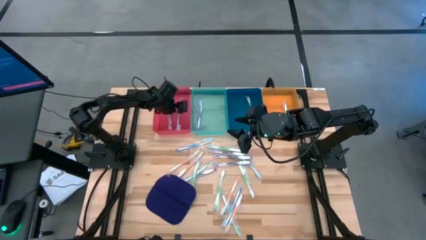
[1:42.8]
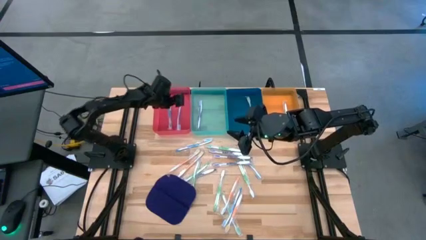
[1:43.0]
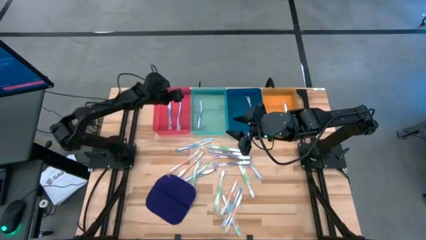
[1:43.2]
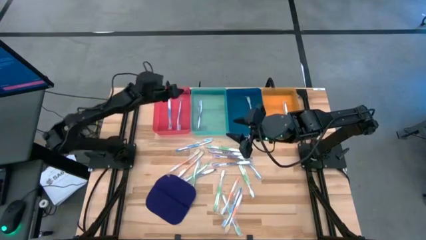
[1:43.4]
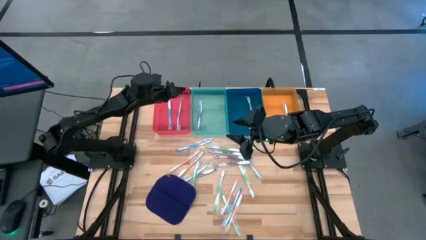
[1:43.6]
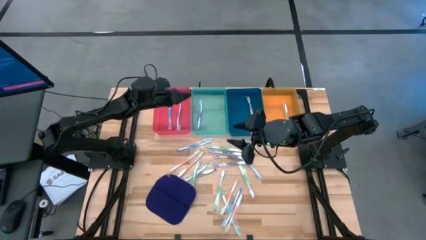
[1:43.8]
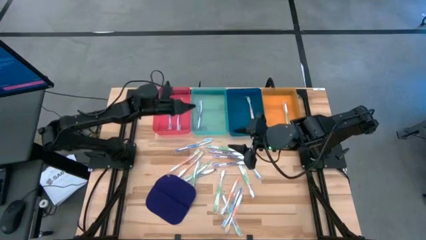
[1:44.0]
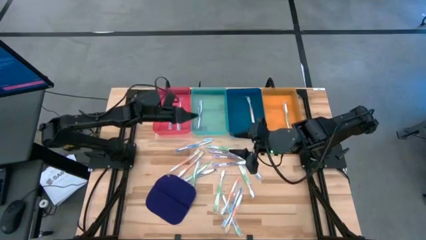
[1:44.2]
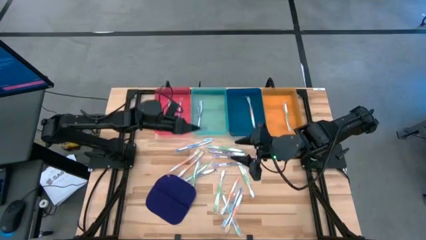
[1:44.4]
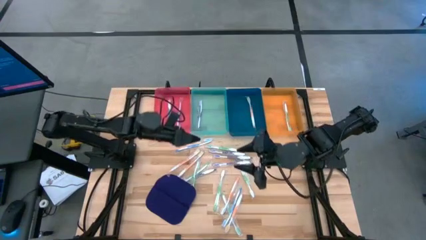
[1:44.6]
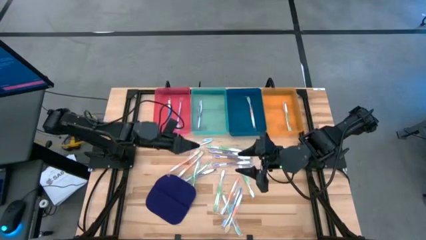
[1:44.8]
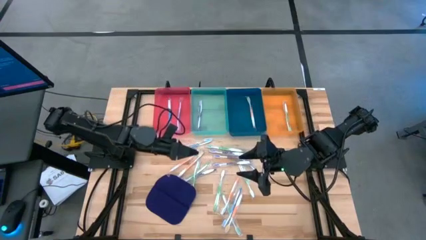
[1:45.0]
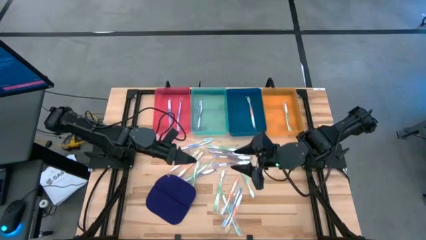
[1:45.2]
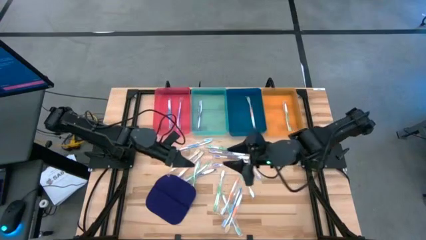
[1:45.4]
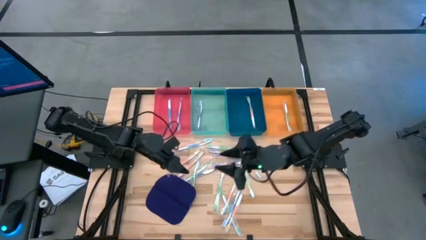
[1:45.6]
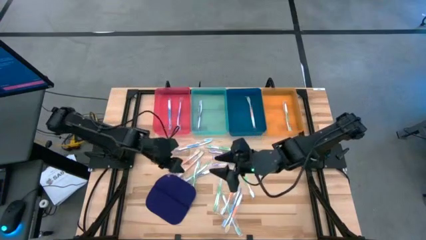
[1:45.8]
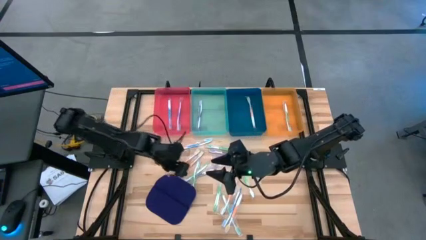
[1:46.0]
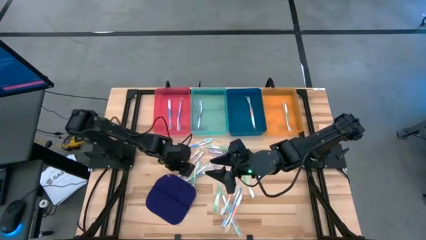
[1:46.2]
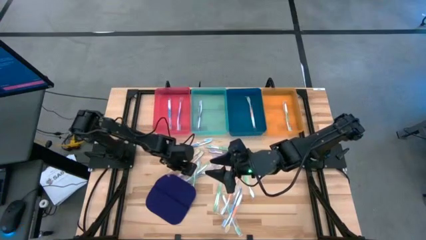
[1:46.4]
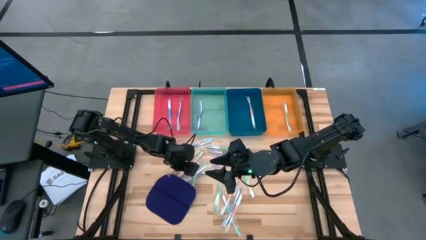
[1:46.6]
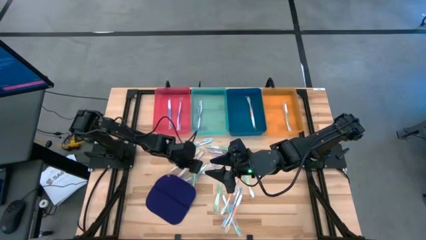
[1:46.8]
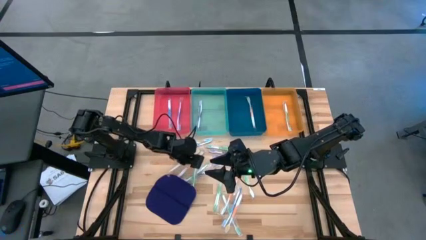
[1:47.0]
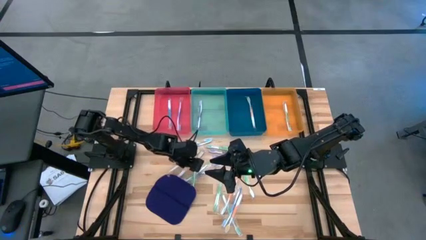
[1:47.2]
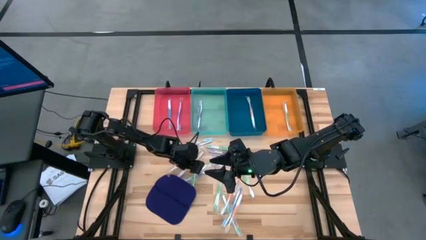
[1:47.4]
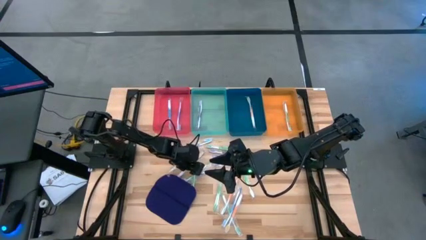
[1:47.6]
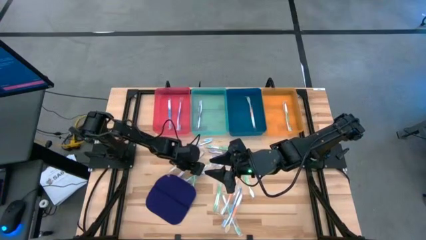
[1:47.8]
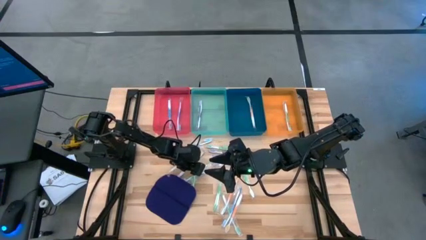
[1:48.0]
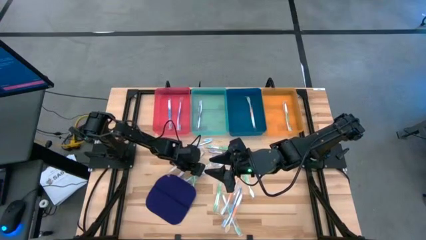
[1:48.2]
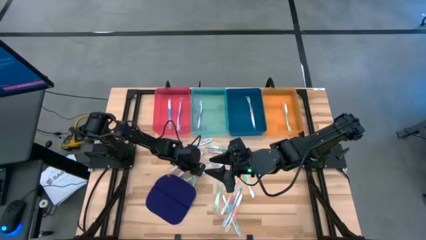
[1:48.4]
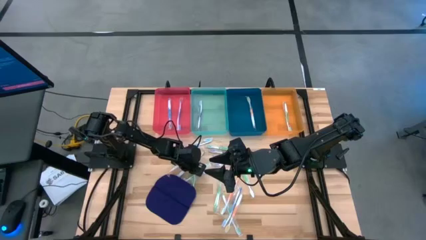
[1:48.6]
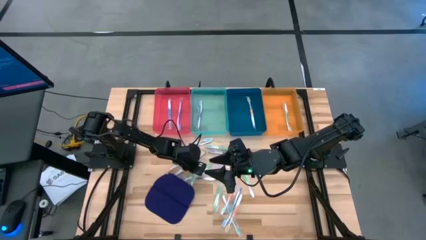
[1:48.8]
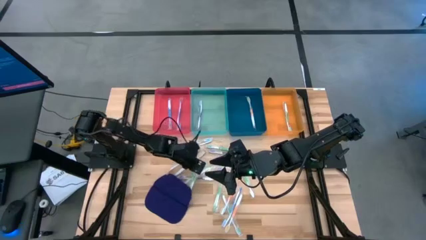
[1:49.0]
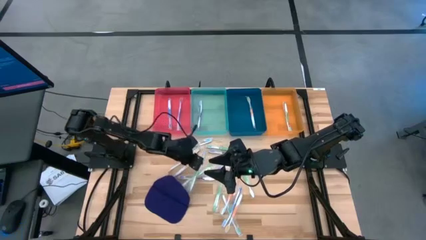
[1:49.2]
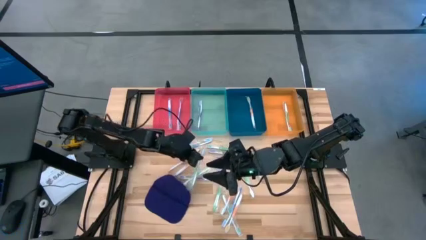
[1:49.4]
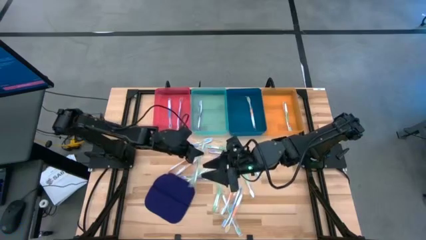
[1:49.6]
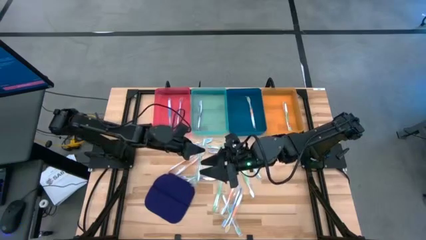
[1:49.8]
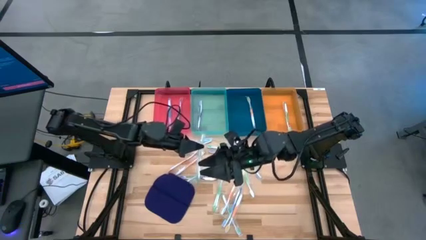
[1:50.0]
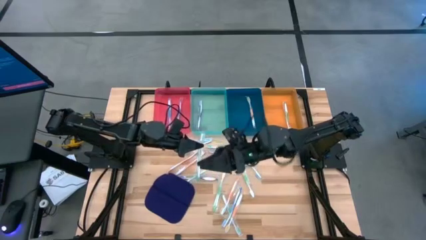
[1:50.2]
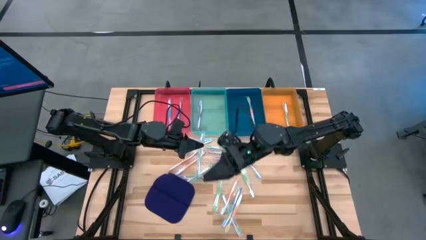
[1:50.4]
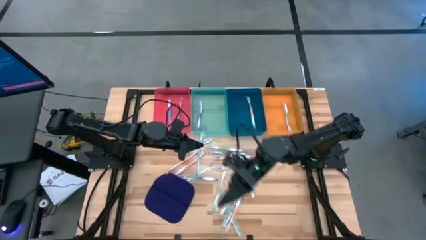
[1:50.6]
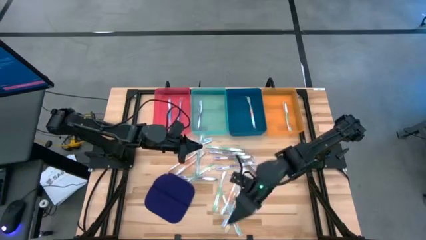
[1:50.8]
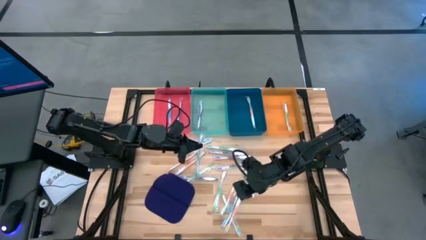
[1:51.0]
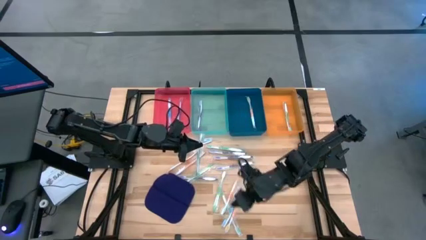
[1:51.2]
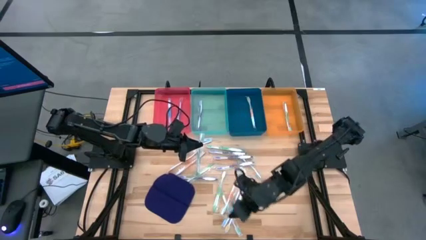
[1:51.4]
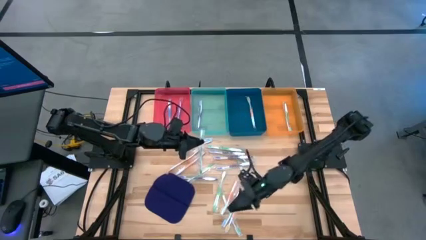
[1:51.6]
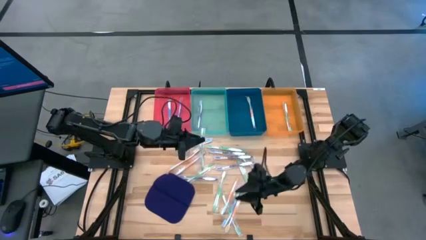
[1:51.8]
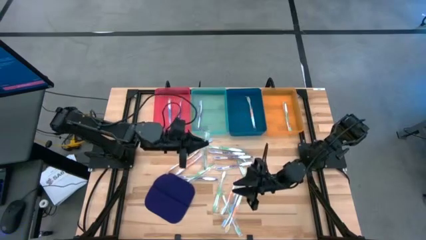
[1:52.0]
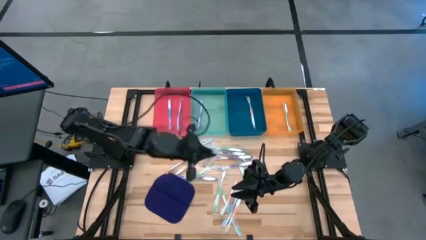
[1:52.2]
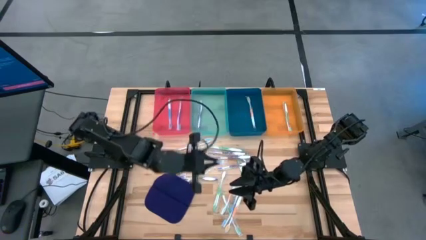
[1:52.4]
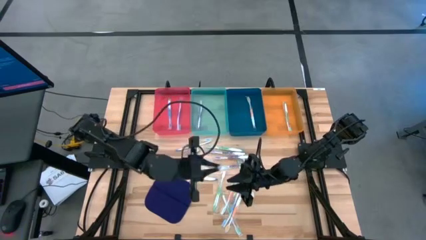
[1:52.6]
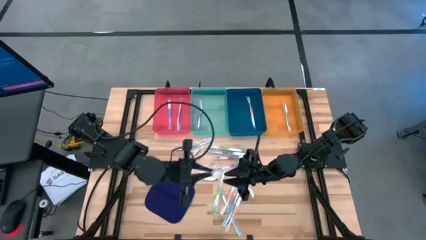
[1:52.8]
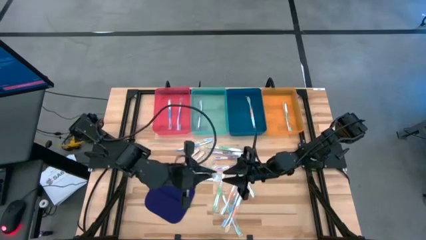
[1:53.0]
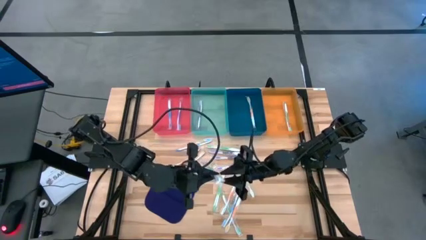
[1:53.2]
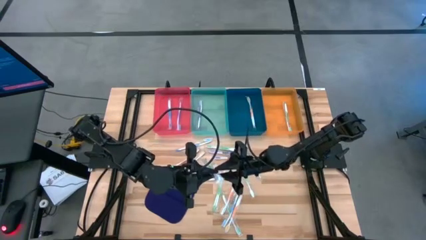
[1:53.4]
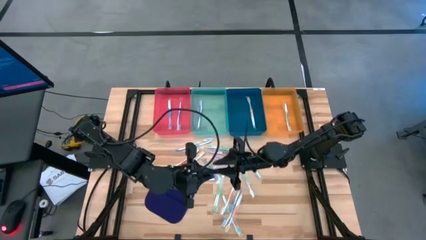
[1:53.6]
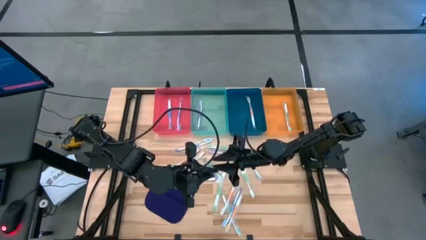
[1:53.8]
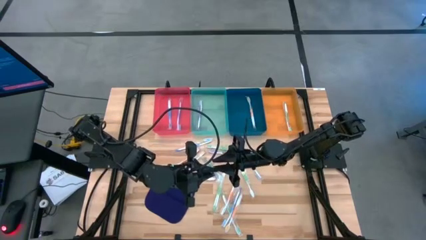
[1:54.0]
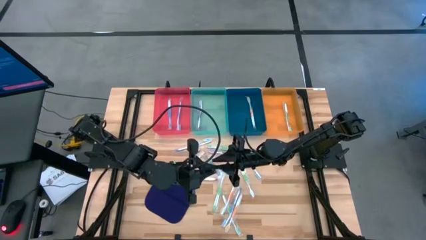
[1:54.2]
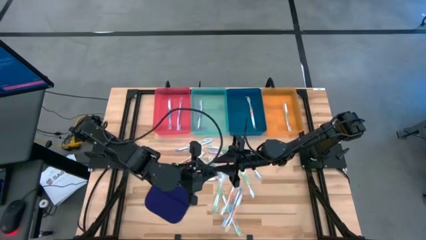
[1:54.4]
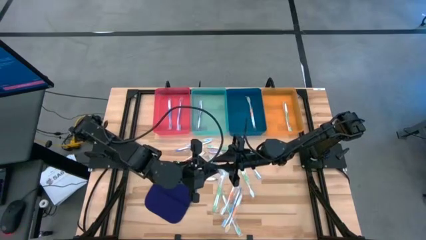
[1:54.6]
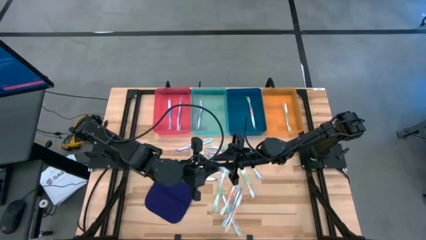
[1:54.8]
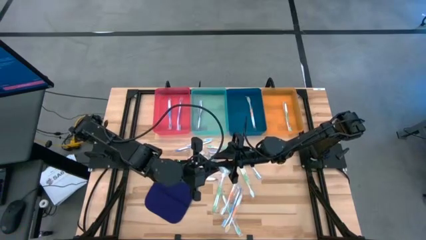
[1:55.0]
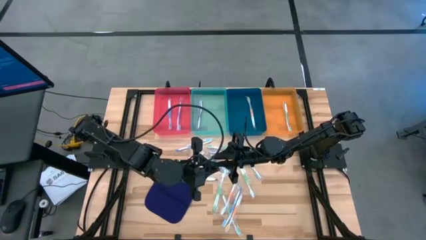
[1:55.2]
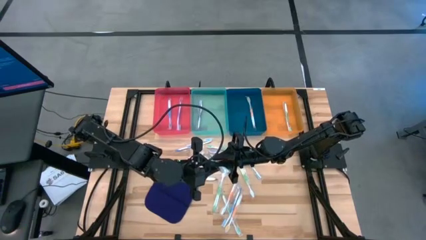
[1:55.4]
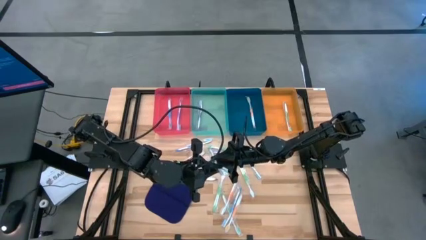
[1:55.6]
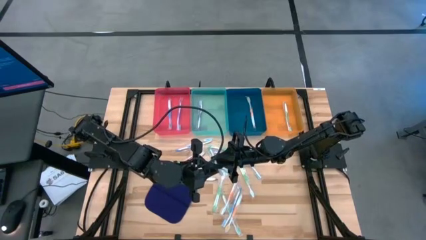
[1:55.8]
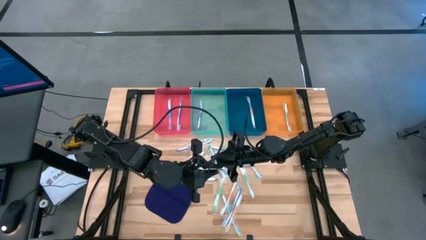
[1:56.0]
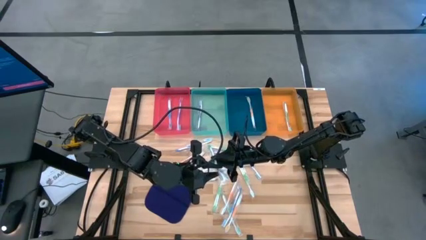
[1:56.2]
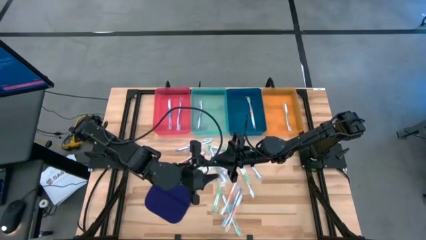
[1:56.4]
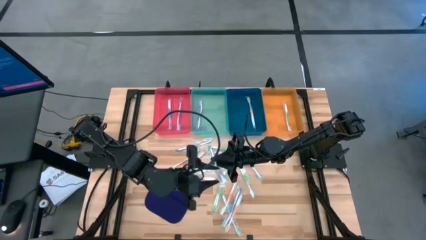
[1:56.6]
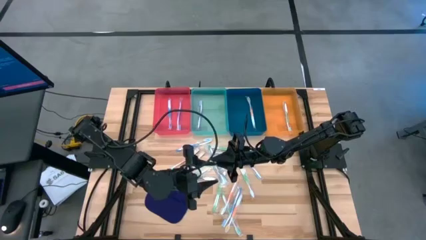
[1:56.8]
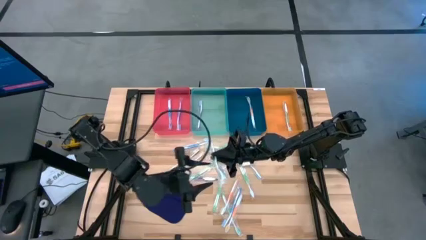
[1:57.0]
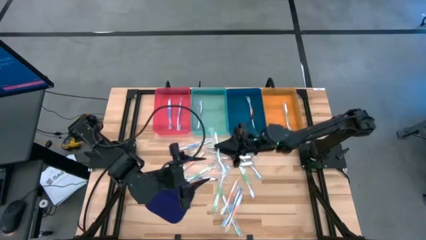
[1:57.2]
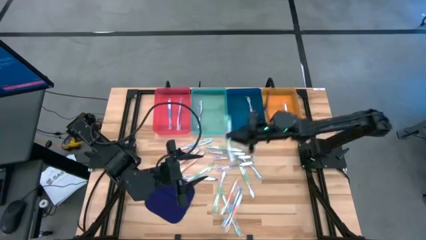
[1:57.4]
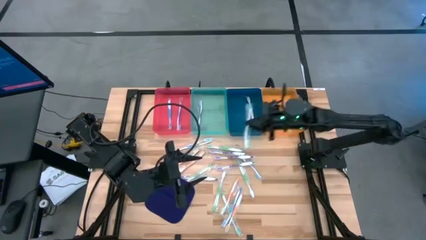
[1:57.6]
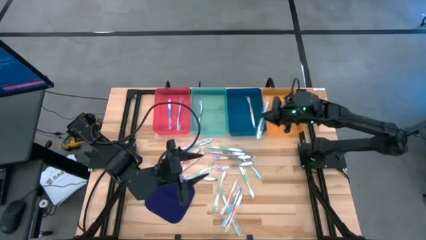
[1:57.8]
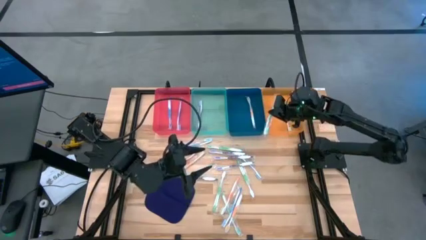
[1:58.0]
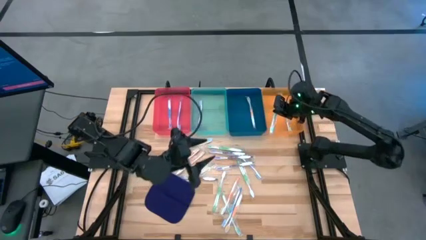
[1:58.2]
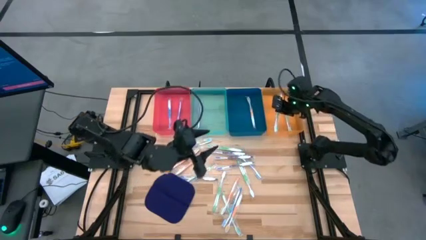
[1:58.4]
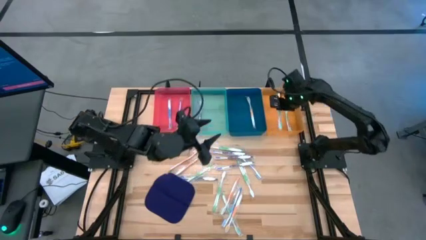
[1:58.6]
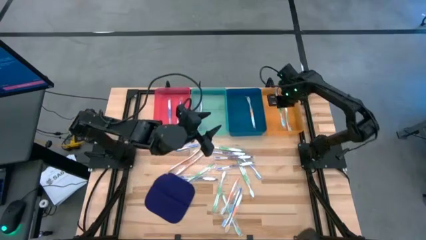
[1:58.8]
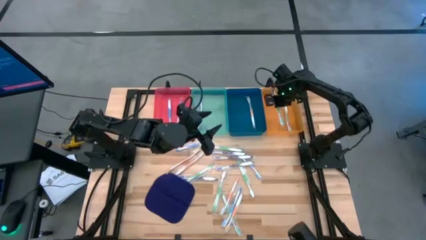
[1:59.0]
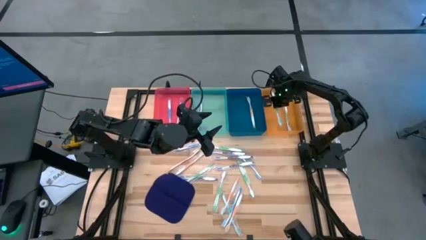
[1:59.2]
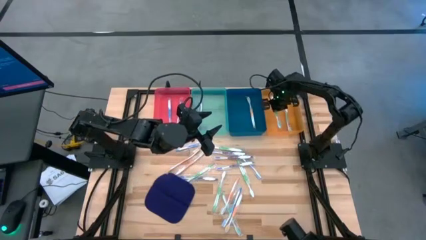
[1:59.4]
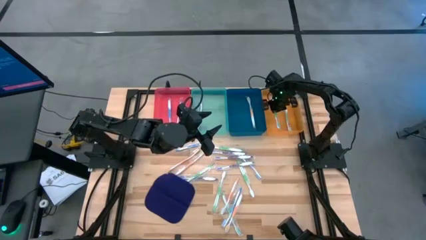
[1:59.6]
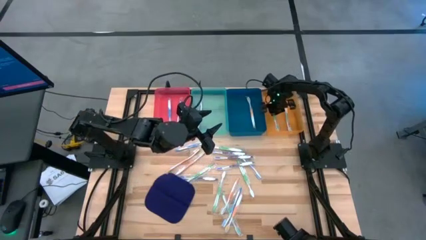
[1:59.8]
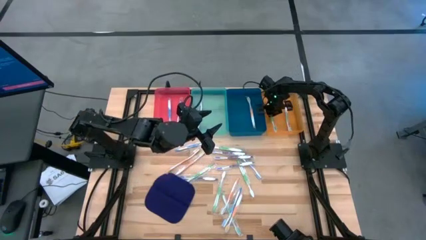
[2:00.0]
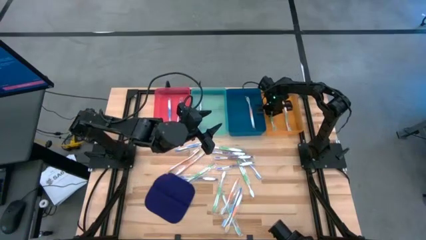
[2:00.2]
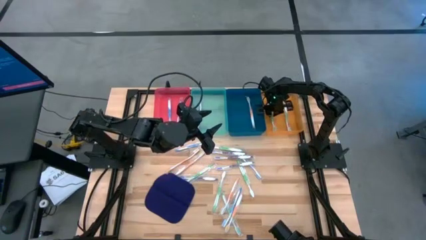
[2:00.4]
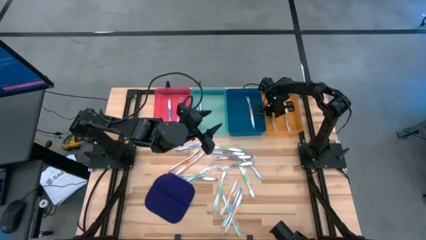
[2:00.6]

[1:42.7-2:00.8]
Task: Pick & Place Toothbrushes
Put the green toothbrush into the orange bin
